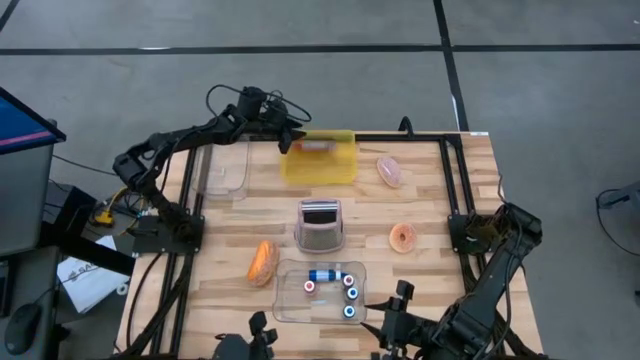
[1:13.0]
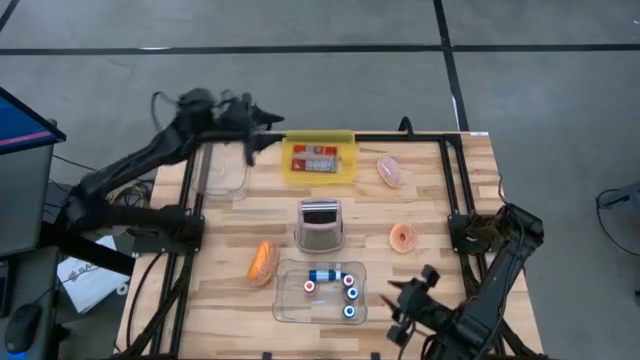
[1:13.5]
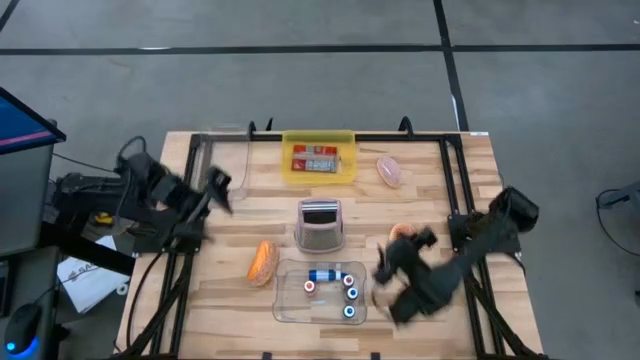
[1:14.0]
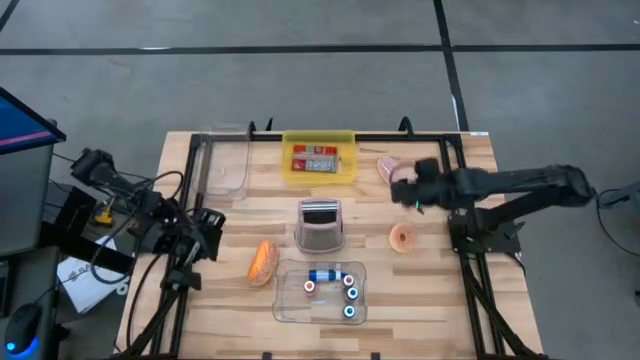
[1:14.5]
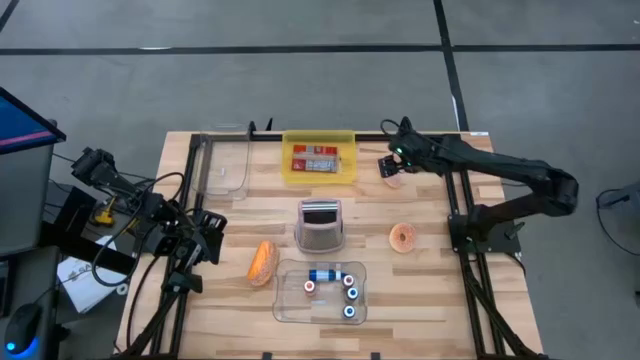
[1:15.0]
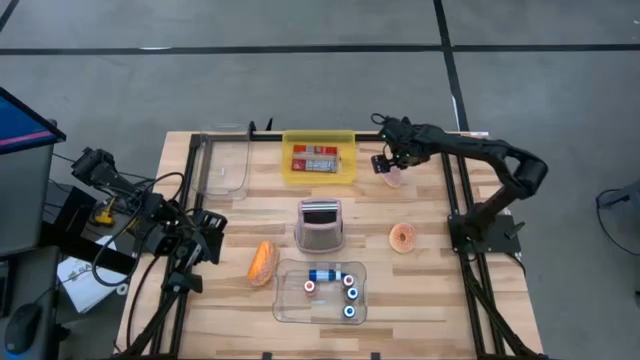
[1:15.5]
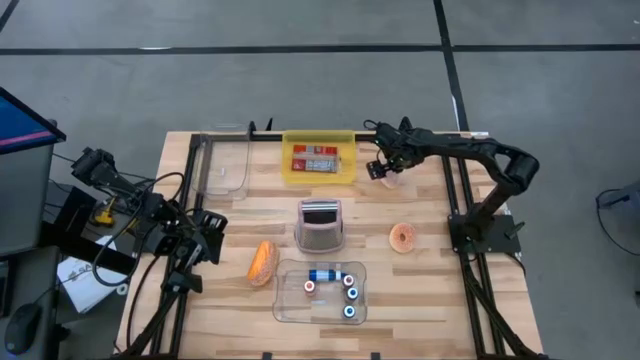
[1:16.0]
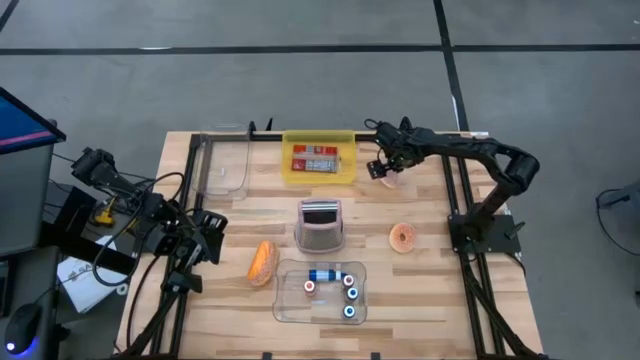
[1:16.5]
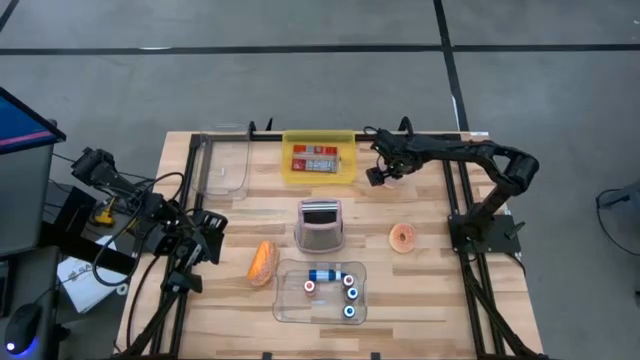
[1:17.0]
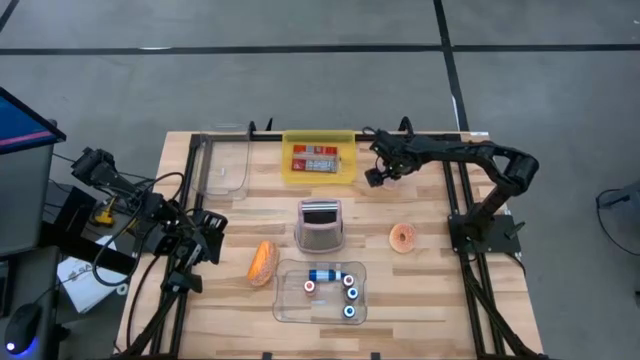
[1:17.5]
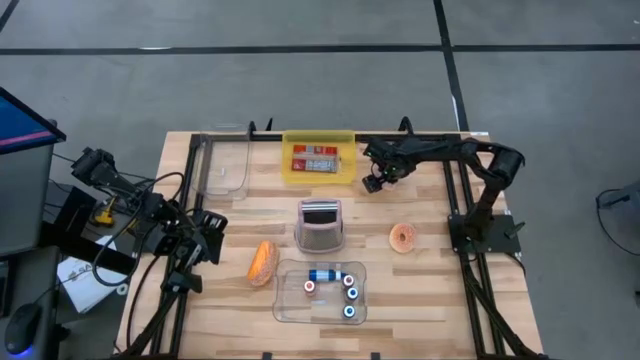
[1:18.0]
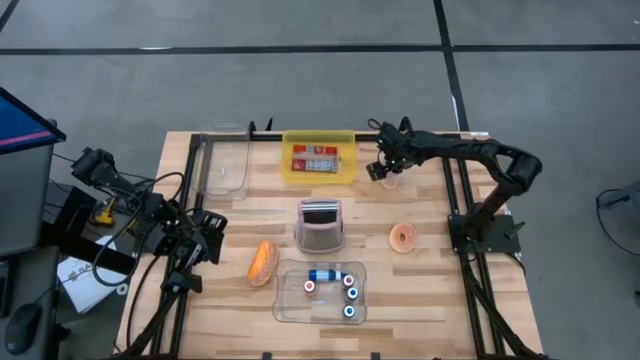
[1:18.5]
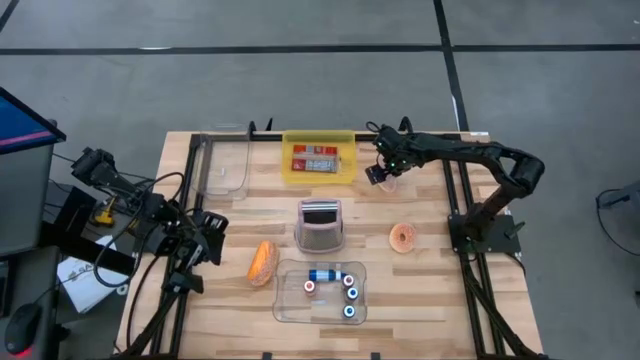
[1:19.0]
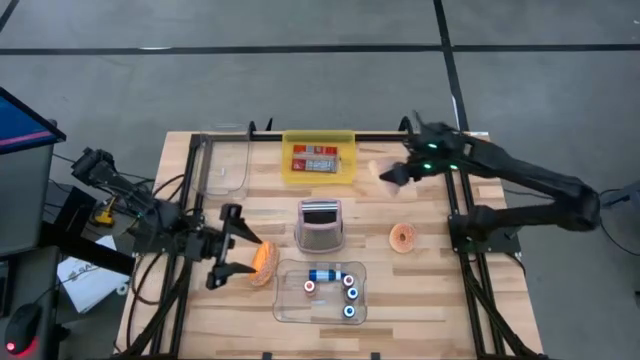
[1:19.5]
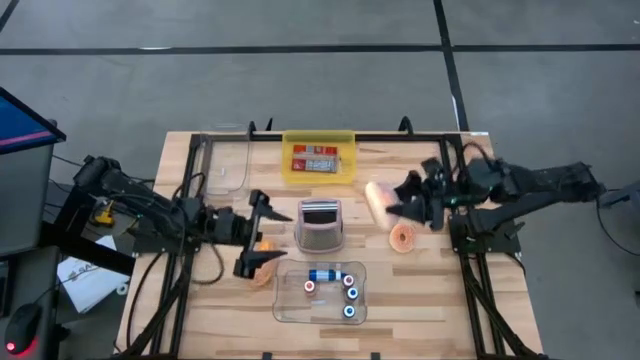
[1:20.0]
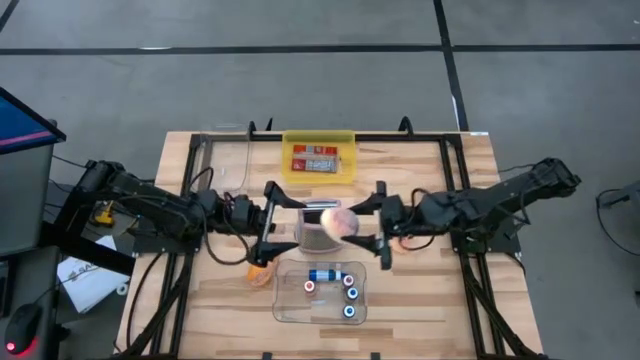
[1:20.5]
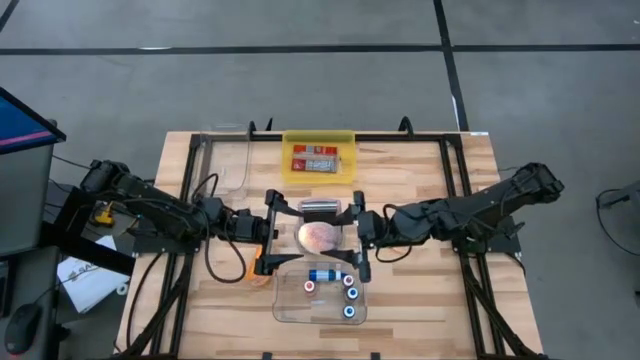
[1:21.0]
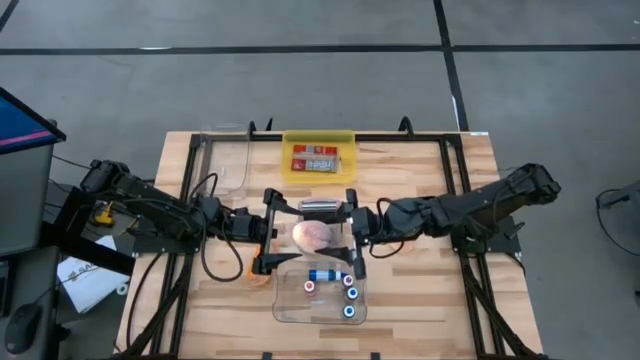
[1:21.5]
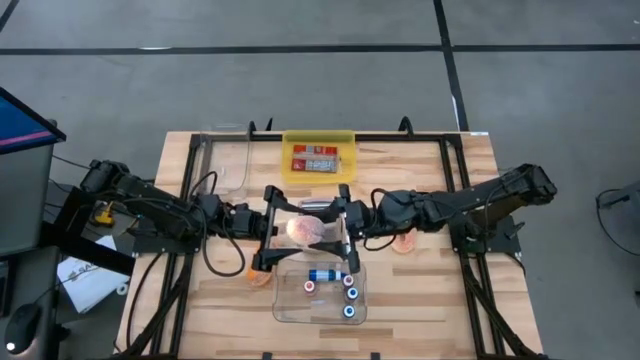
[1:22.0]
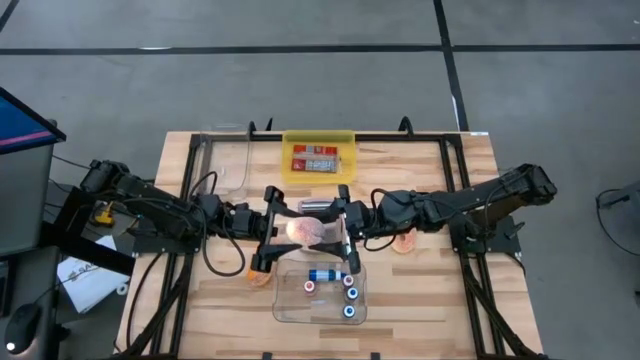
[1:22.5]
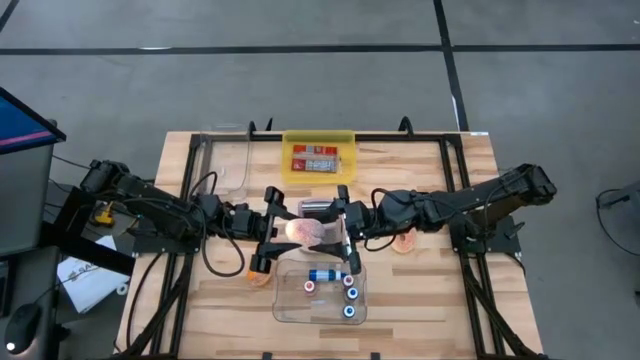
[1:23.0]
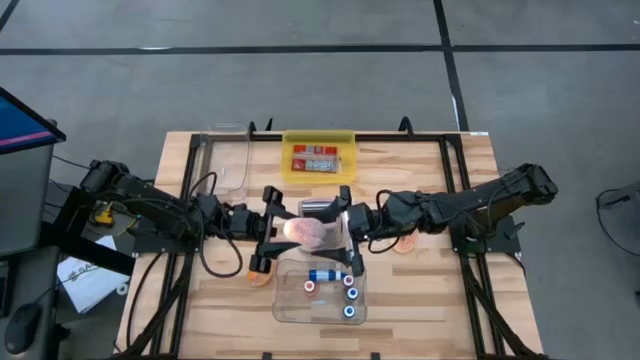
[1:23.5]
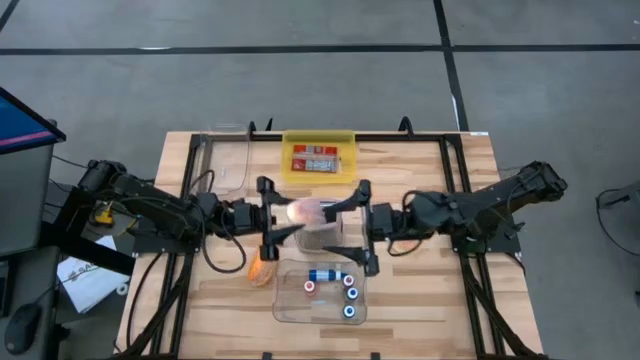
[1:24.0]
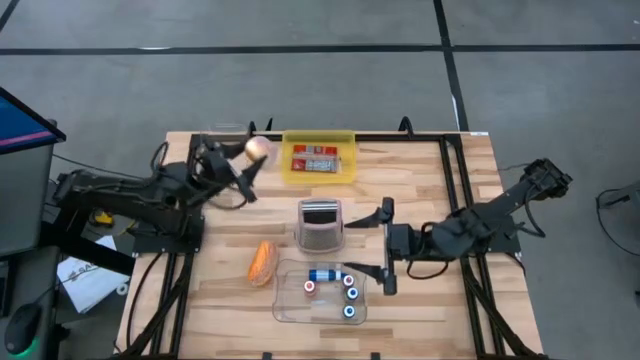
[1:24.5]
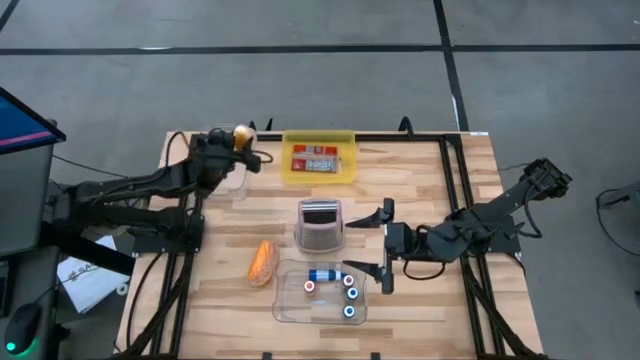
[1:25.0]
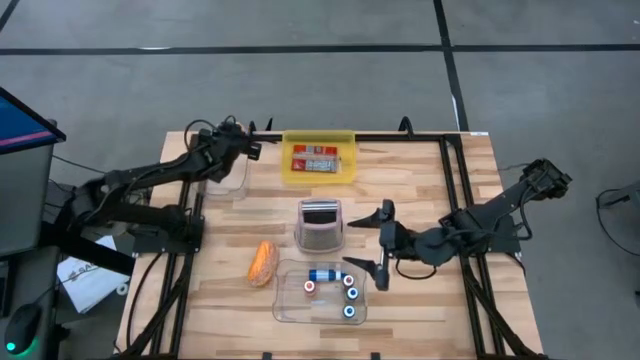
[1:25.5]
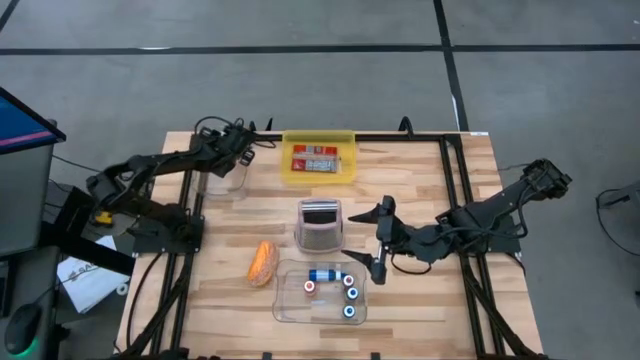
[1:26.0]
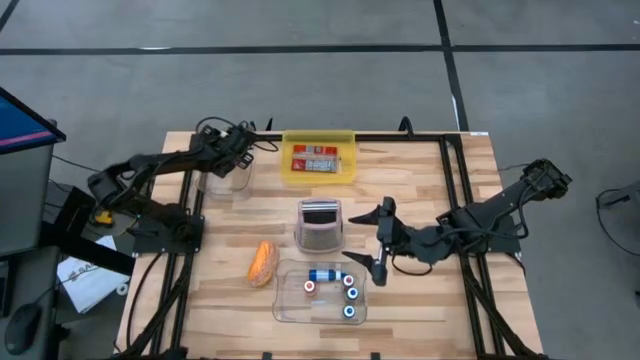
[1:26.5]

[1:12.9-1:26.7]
Put the pink donut into the top transparent bin

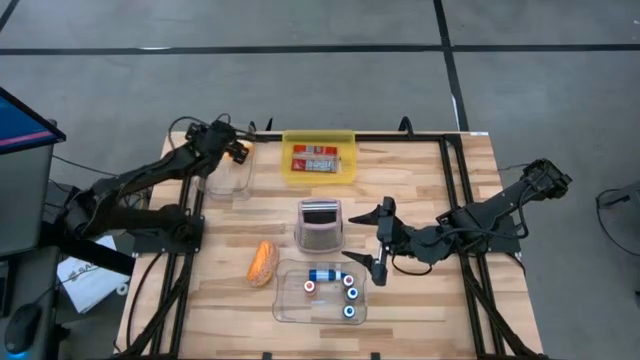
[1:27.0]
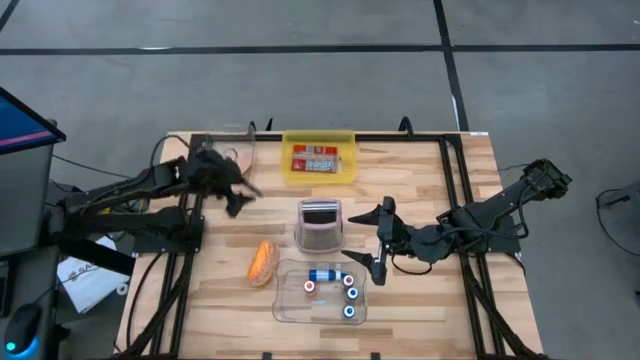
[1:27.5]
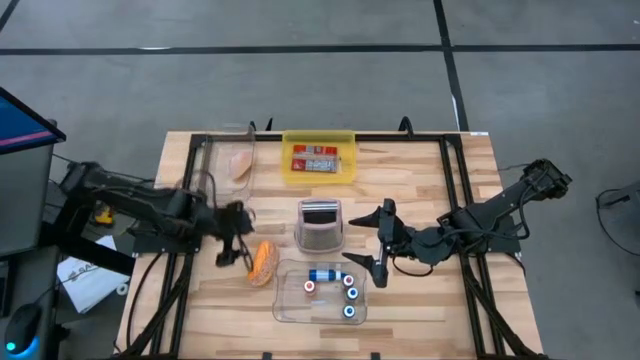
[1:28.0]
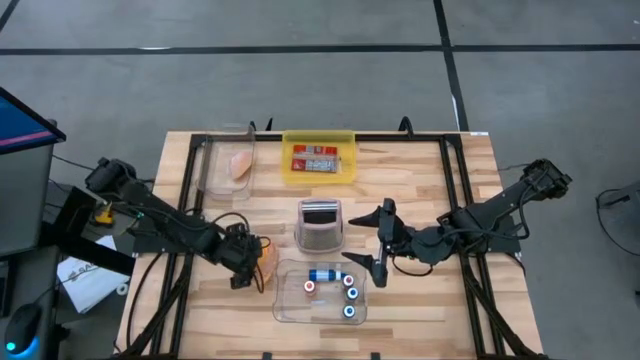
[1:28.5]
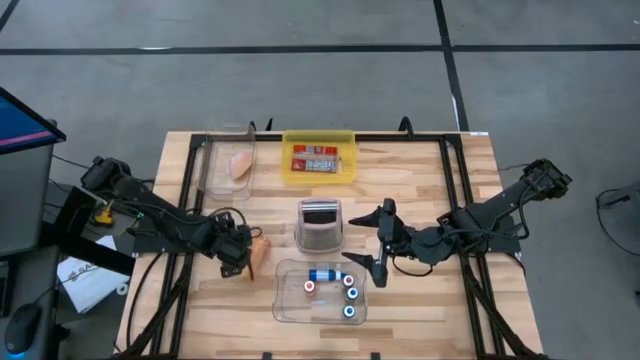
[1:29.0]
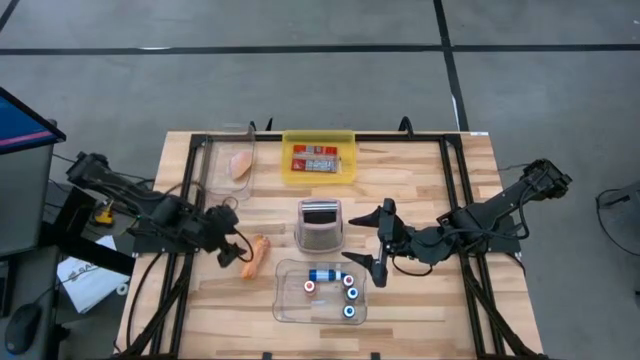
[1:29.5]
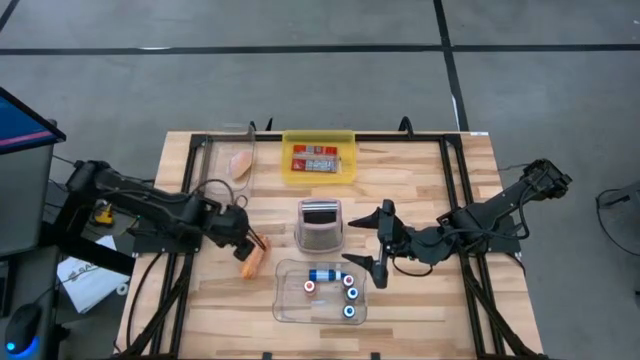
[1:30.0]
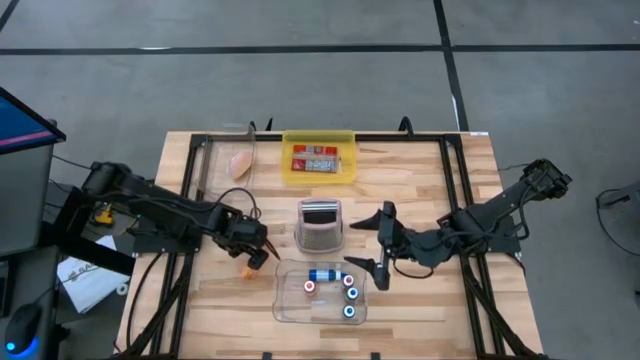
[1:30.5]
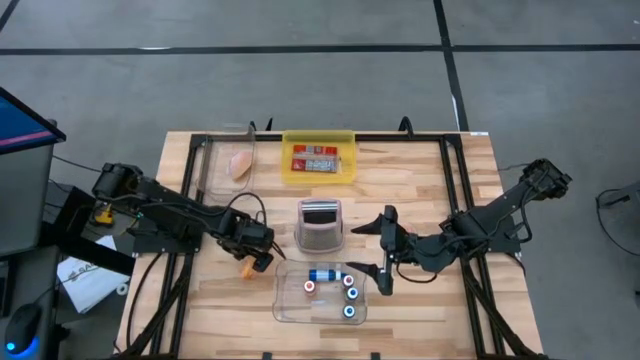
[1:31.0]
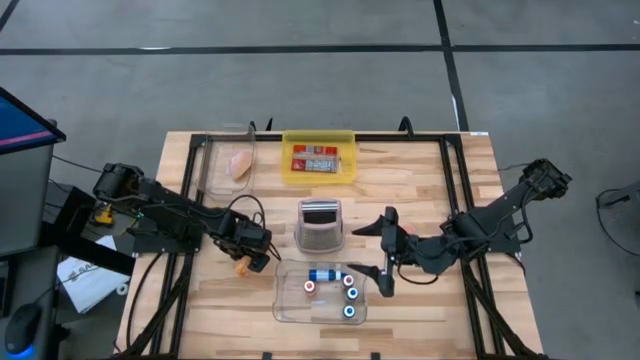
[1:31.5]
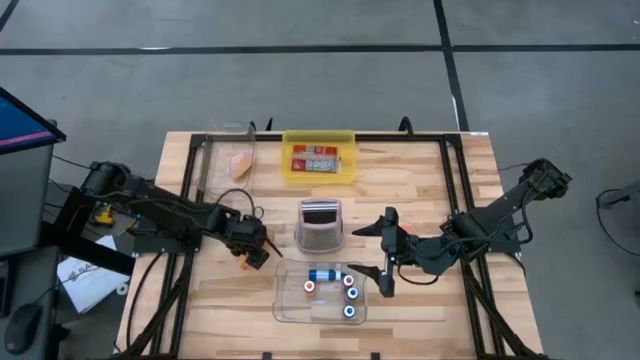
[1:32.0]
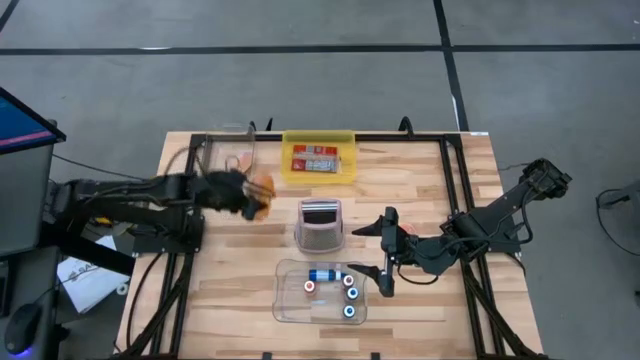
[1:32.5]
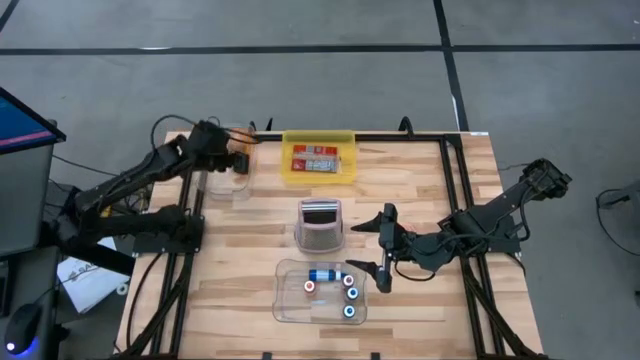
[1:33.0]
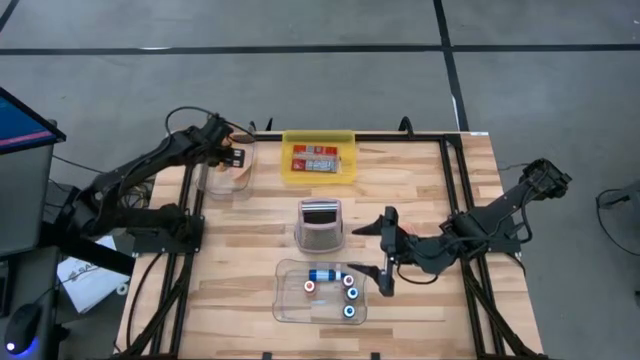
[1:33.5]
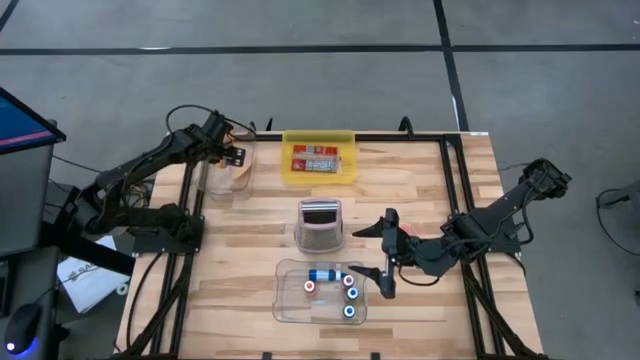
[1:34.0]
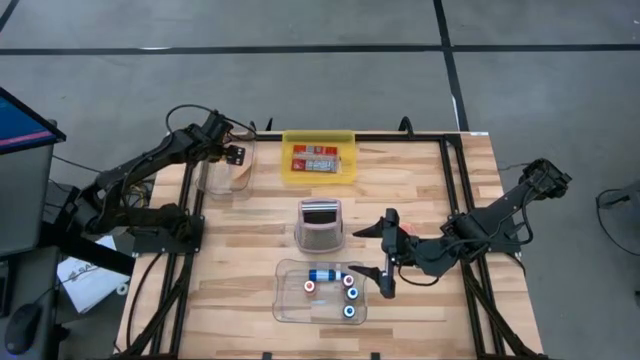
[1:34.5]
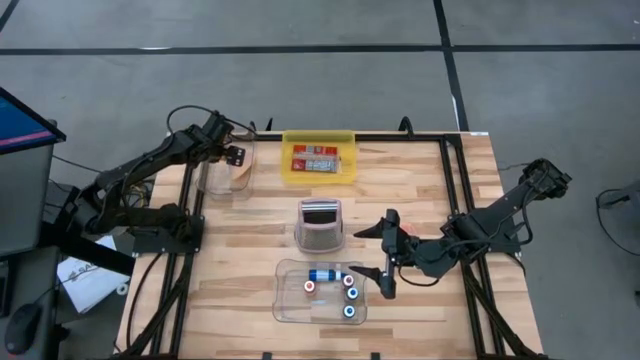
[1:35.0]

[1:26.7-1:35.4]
Put the left orange donut into the top transparent bin
